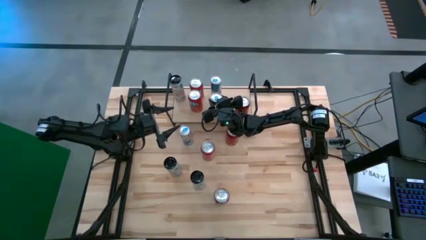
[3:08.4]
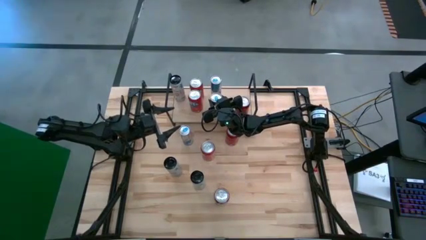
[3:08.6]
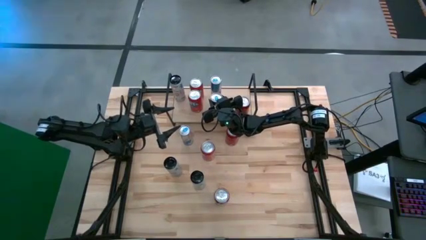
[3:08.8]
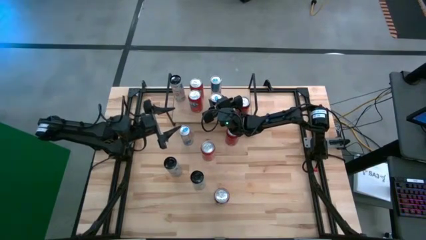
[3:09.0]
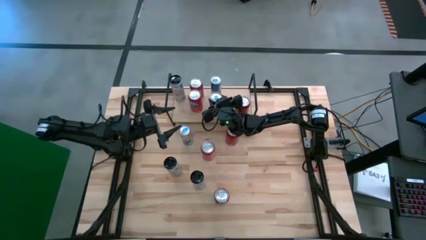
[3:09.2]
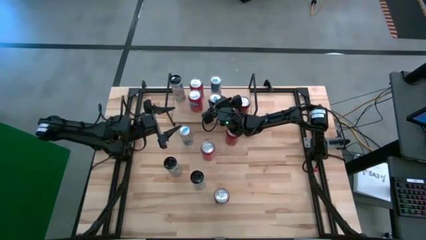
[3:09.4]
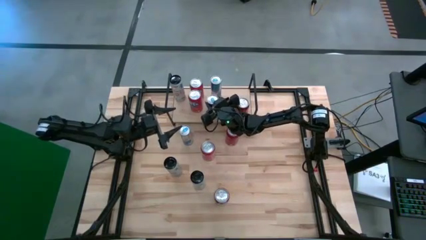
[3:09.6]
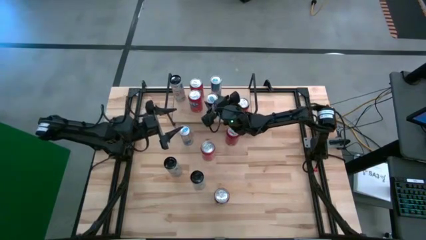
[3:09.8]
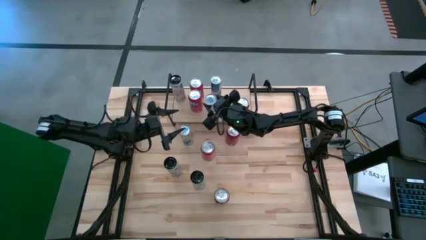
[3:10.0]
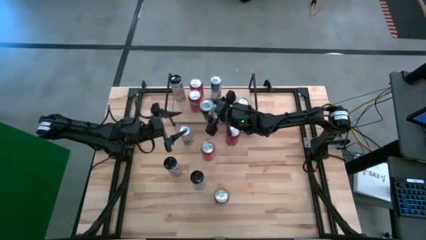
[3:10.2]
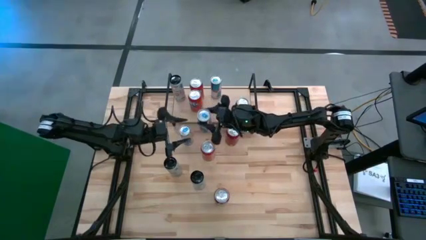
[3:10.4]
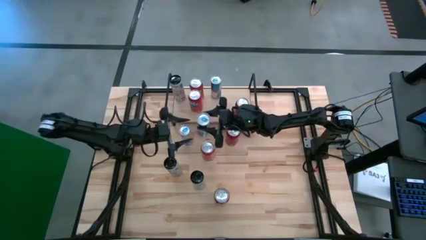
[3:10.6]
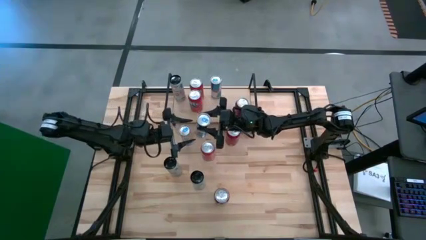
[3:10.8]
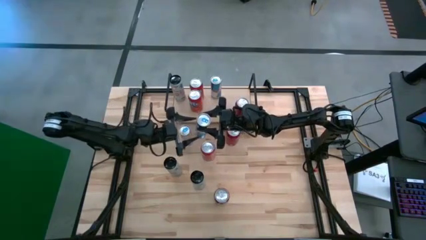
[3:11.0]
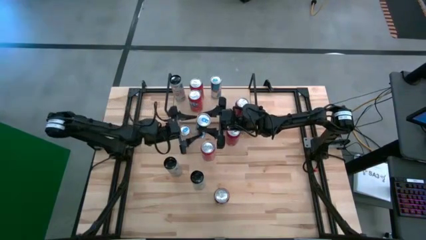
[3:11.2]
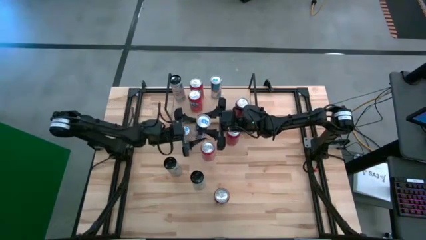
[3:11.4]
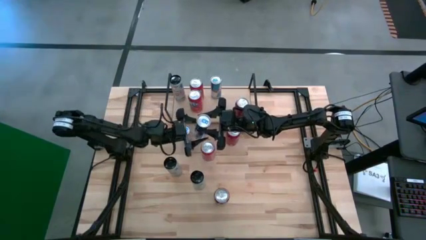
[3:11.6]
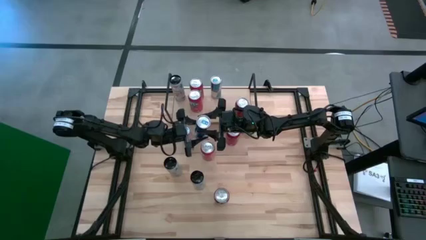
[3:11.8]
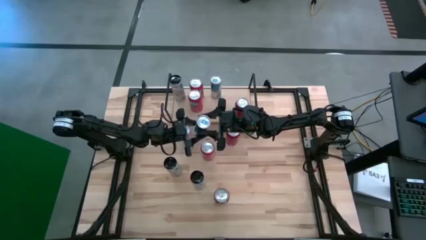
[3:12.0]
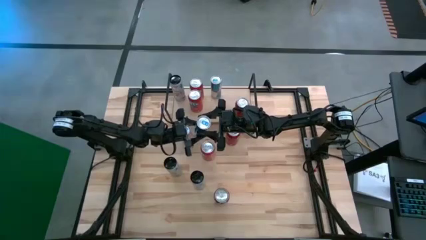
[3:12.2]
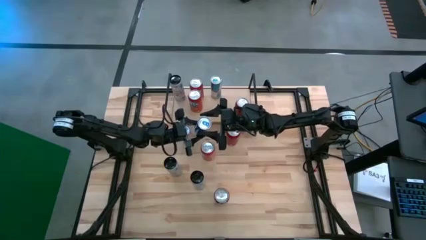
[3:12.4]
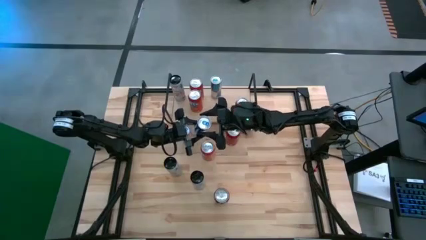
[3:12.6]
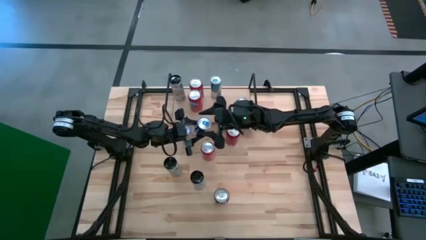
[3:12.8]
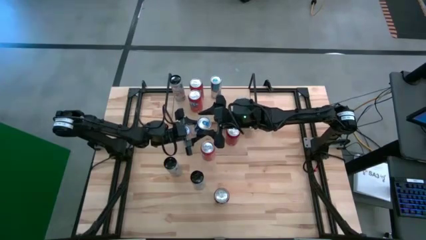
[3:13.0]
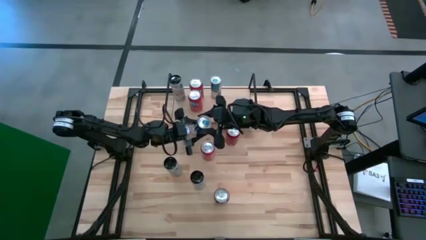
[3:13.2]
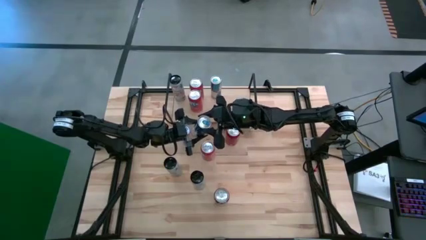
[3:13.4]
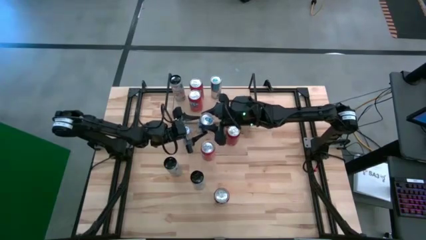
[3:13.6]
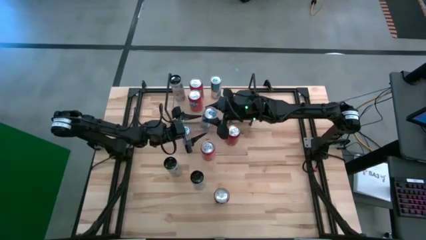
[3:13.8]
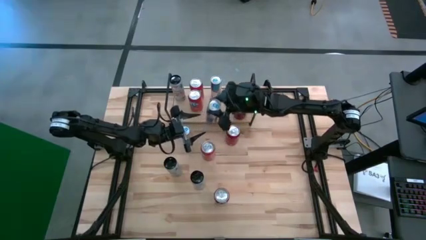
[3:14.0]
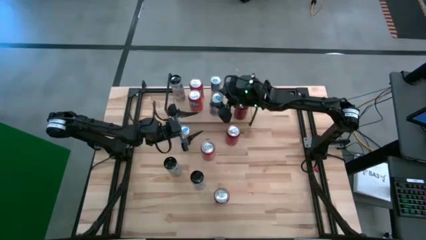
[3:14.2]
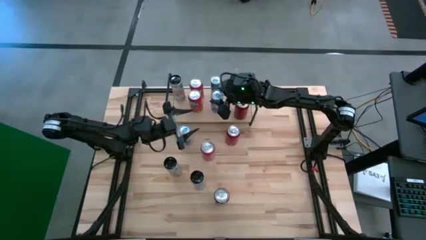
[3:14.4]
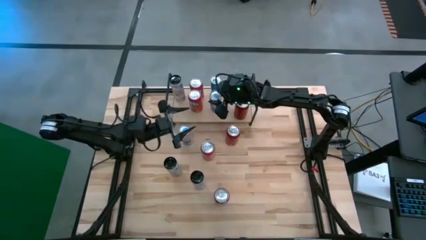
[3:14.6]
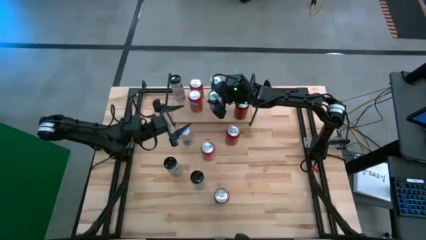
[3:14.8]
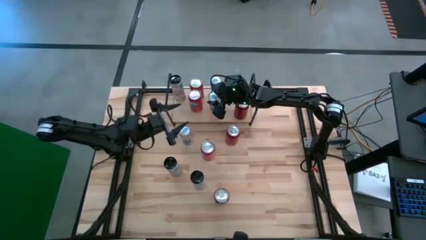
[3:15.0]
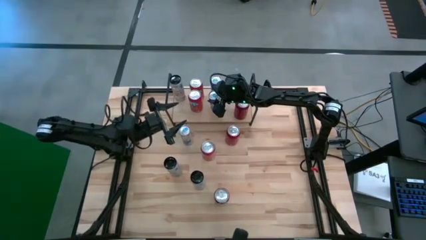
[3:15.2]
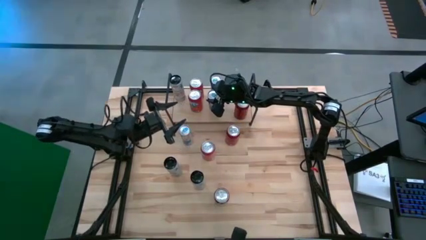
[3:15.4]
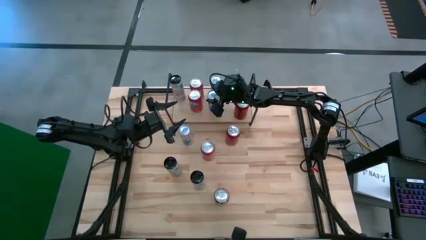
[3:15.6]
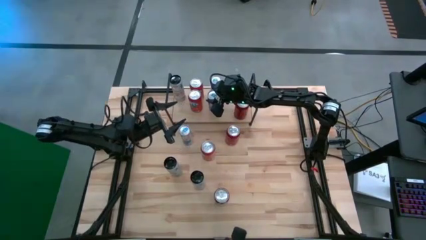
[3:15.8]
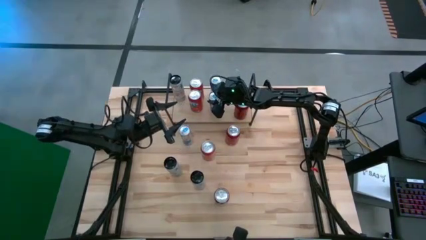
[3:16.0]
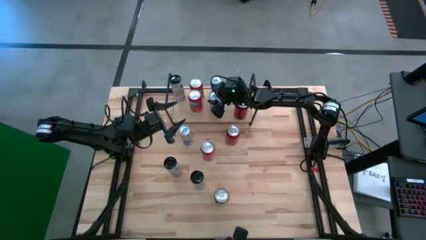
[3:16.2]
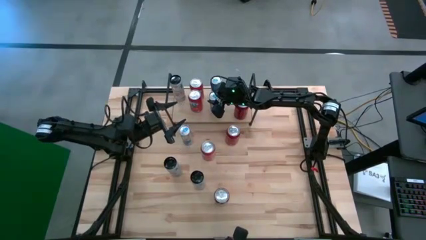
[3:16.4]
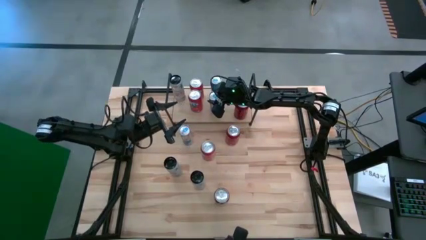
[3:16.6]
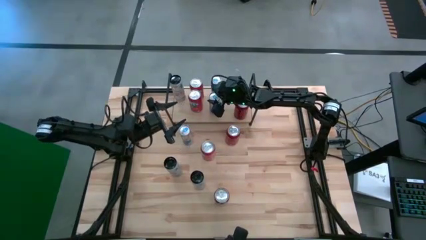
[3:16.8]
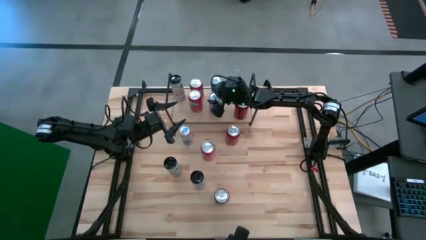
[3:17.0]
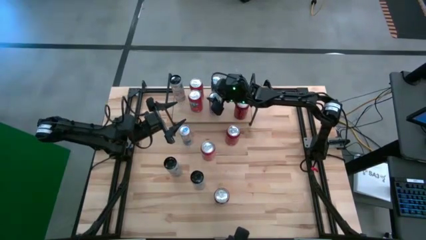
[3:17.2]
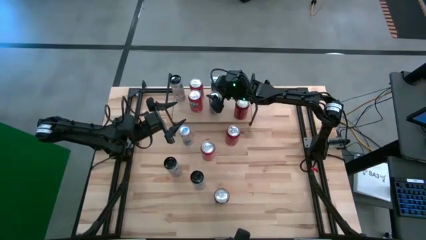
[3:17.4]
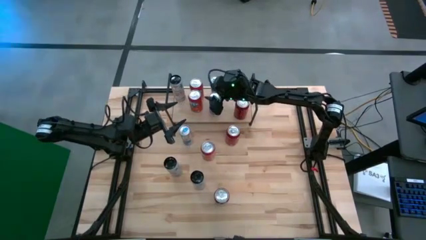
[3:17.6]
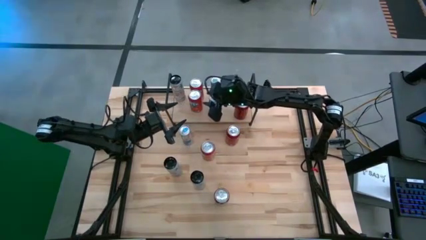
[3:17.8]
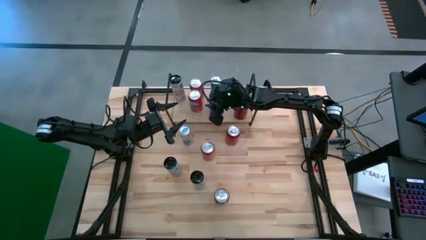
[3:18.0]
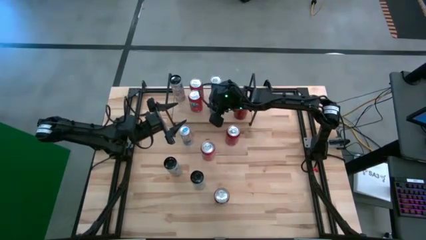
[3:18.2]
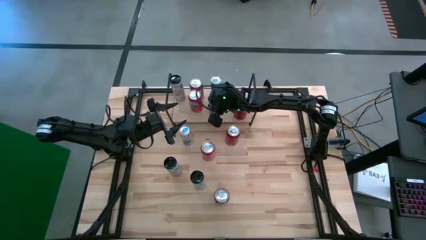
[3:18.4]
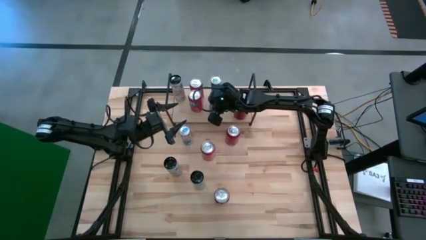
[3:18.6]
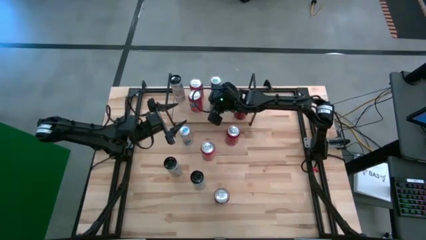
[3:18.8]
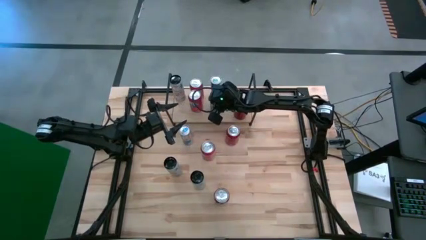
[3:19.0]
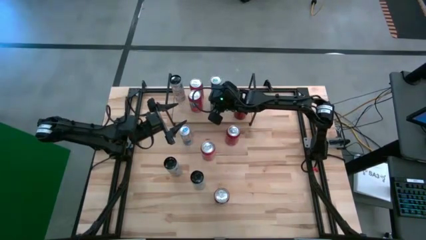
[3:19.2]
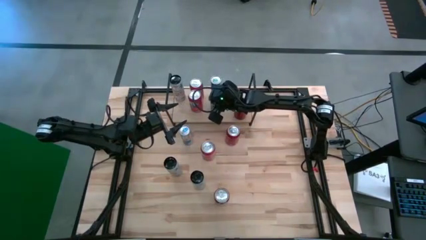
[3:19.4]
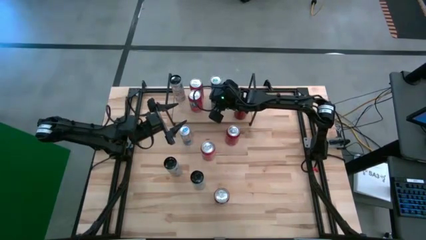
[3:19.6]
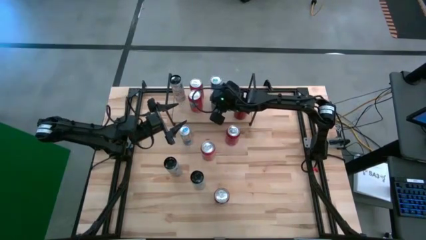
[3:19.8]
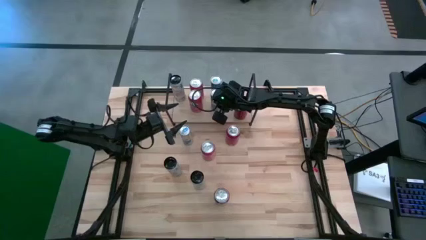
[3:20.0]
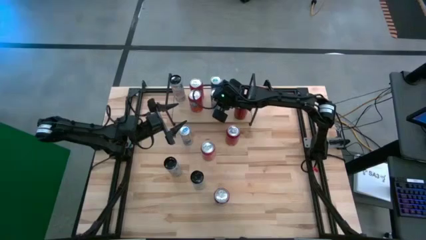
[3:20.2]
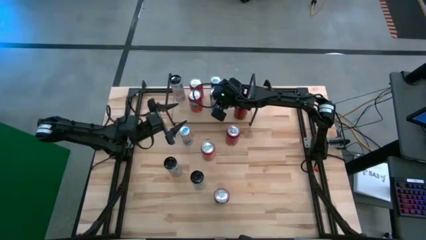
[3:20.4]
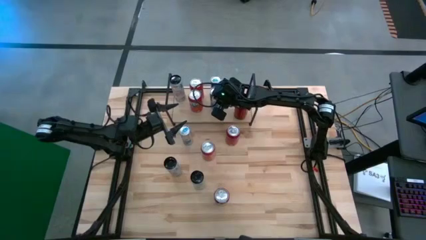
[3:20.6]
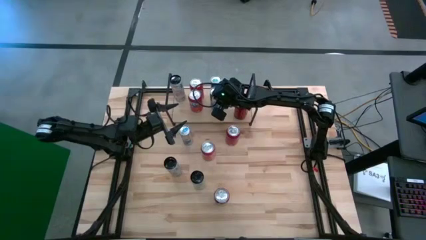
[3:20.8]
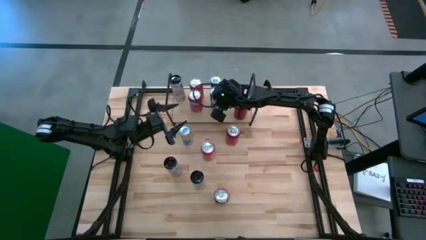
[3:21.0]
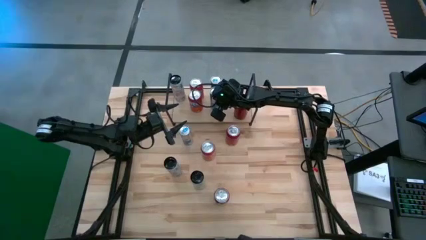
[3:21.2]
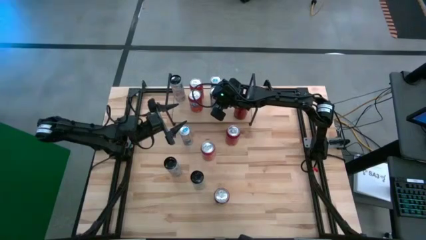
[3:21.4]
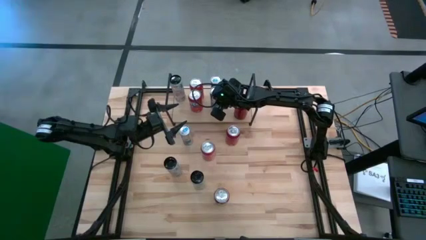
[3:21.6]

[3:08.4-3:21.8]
Task: Place canned beverage on shelf
Put the right blue soda can on the shelf aligned with the other blue soda can
